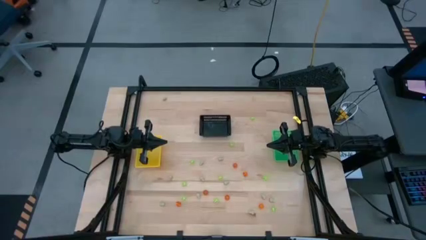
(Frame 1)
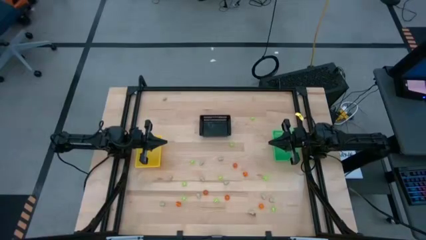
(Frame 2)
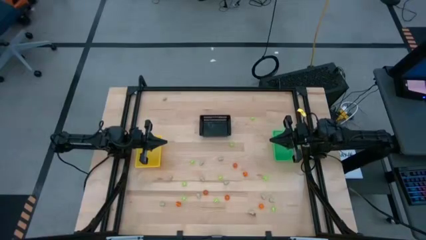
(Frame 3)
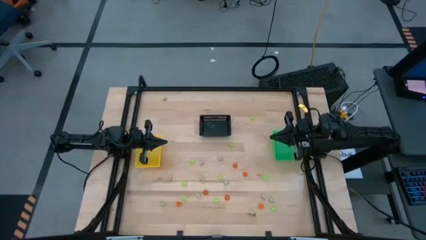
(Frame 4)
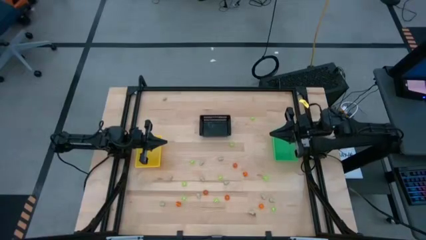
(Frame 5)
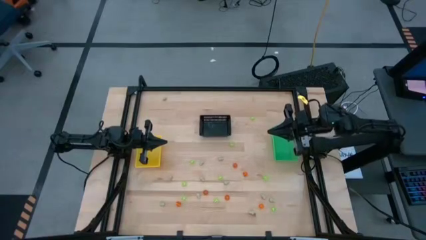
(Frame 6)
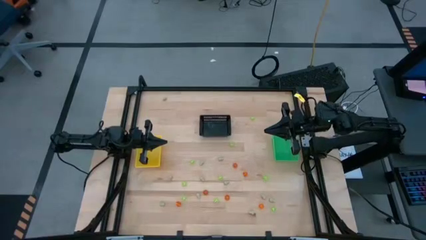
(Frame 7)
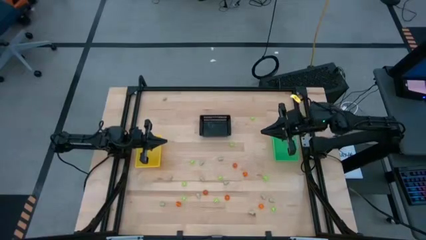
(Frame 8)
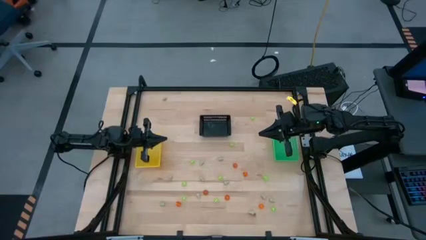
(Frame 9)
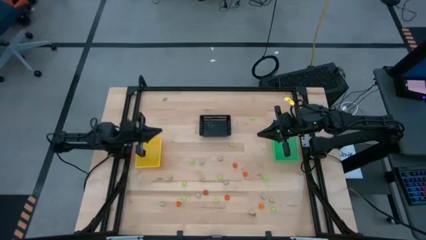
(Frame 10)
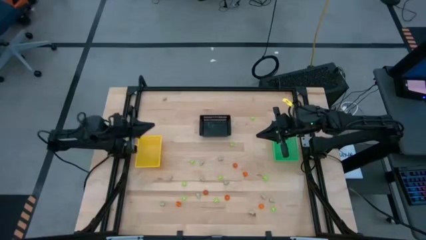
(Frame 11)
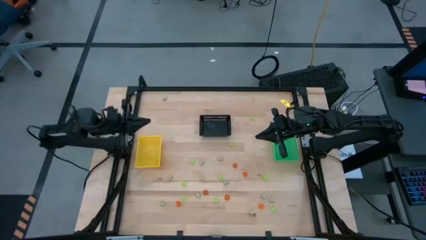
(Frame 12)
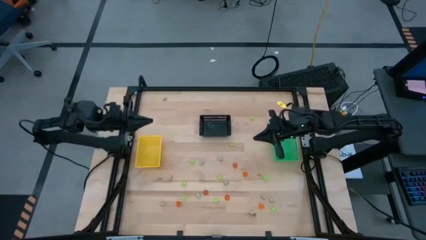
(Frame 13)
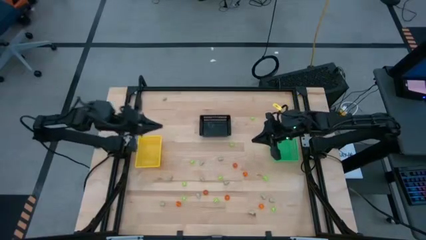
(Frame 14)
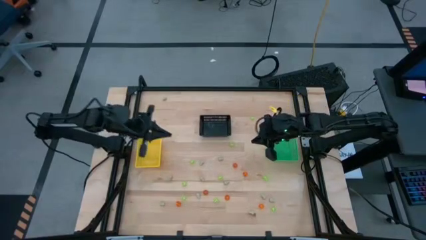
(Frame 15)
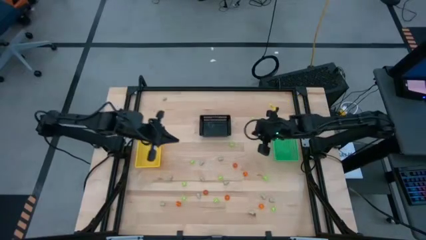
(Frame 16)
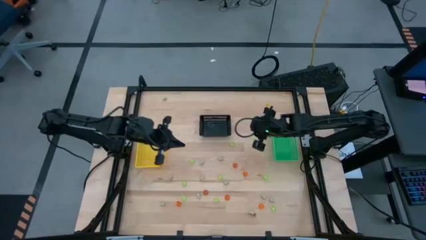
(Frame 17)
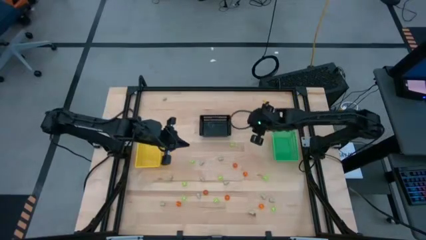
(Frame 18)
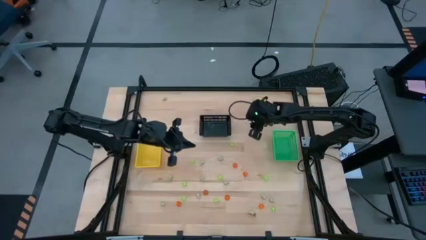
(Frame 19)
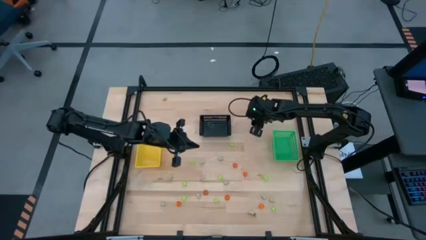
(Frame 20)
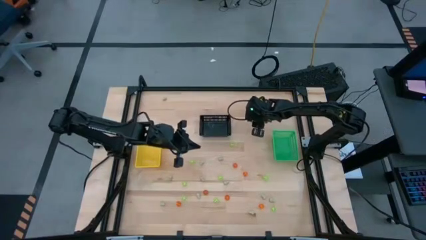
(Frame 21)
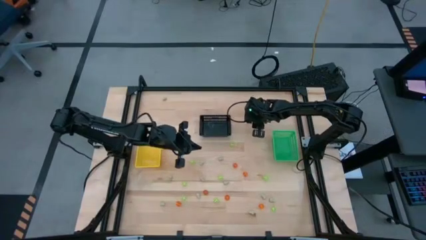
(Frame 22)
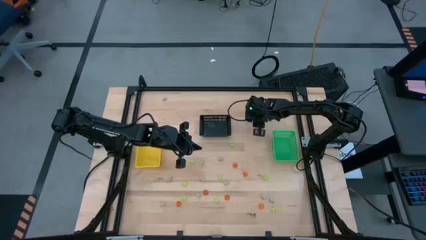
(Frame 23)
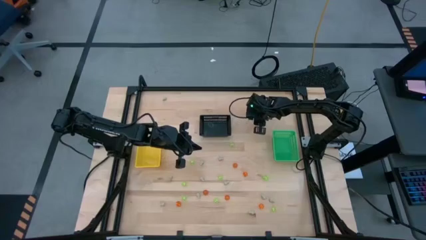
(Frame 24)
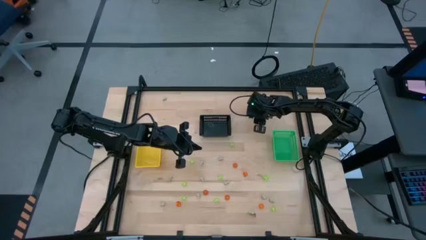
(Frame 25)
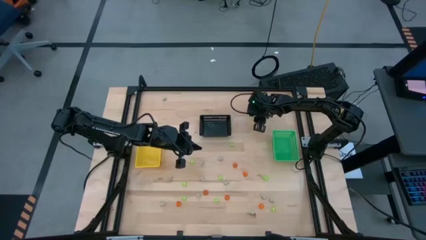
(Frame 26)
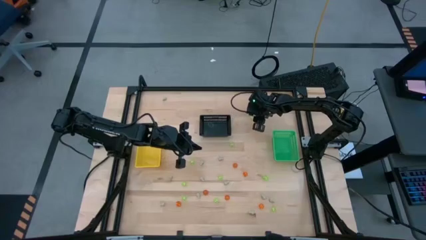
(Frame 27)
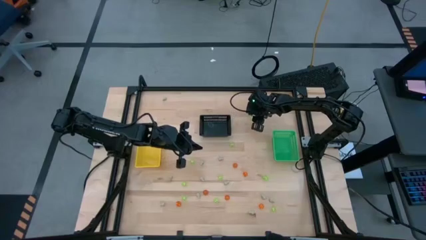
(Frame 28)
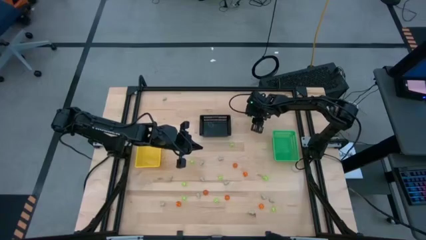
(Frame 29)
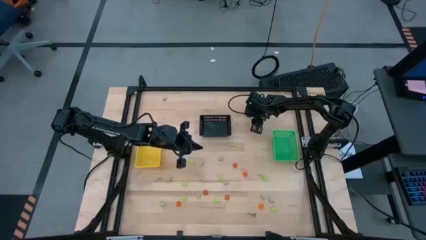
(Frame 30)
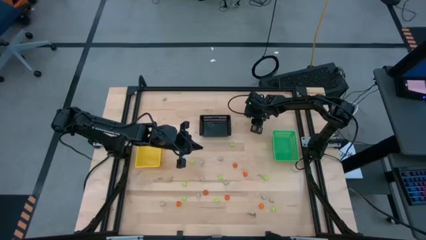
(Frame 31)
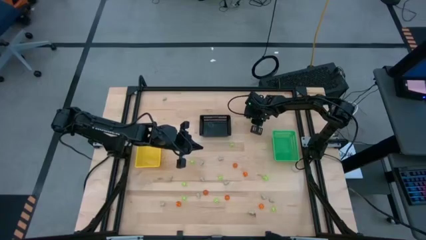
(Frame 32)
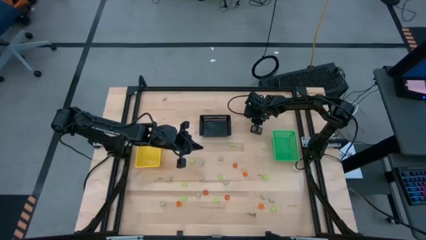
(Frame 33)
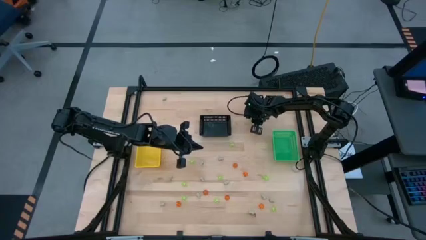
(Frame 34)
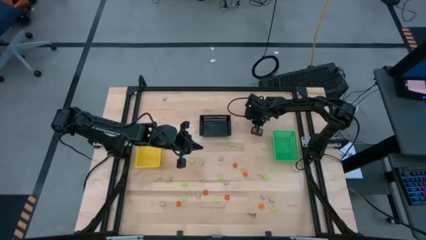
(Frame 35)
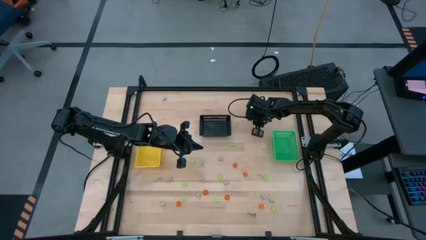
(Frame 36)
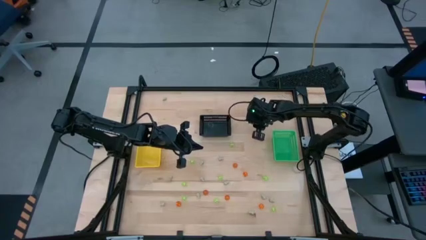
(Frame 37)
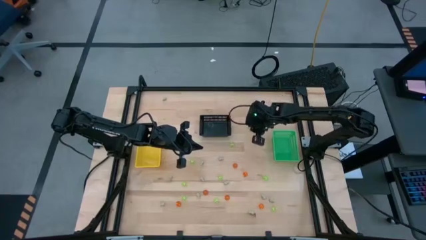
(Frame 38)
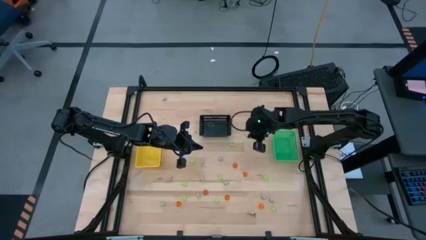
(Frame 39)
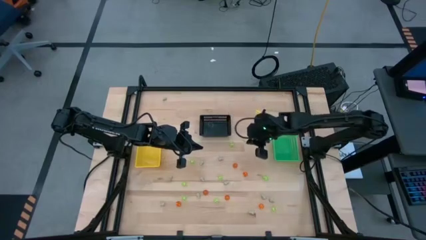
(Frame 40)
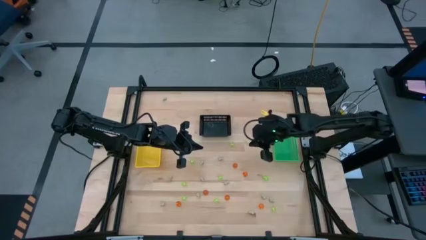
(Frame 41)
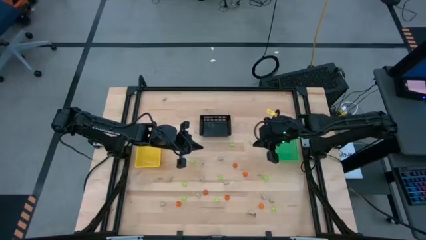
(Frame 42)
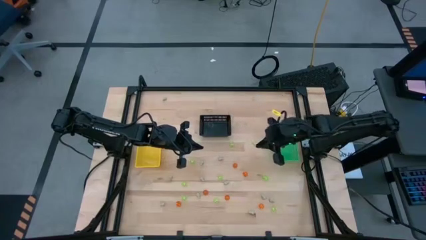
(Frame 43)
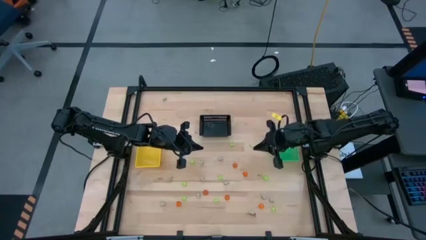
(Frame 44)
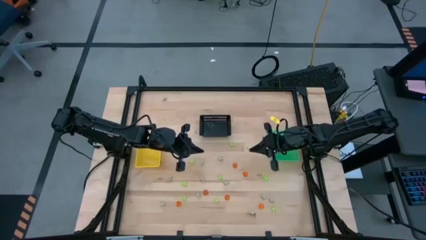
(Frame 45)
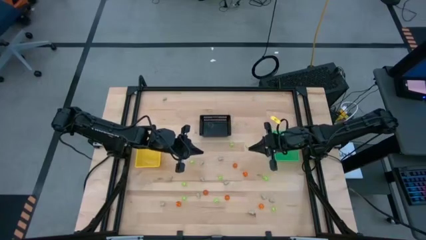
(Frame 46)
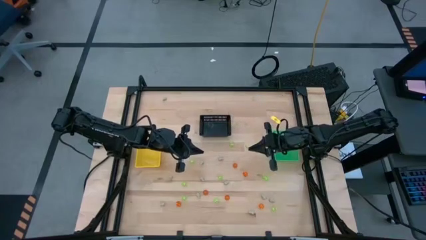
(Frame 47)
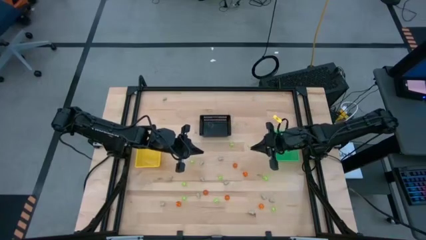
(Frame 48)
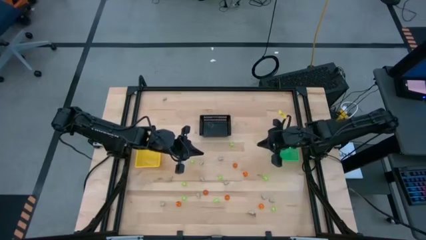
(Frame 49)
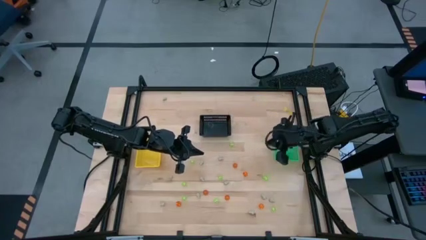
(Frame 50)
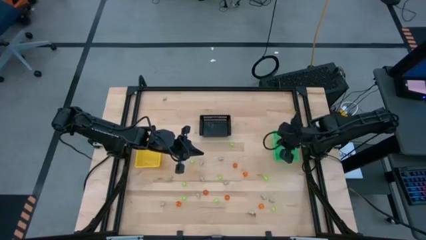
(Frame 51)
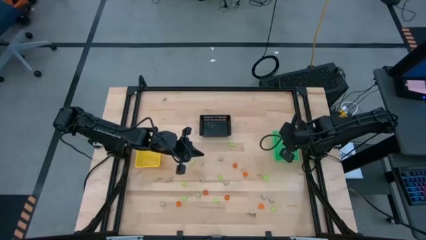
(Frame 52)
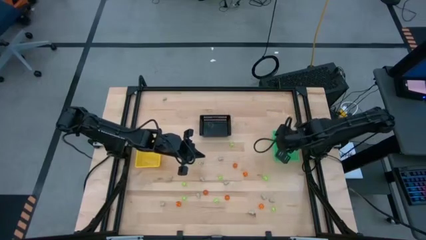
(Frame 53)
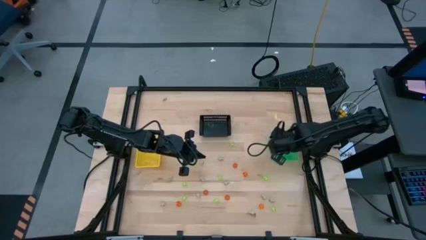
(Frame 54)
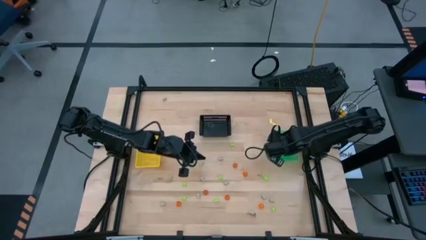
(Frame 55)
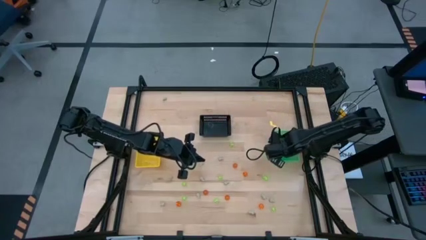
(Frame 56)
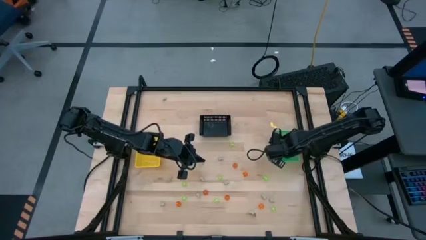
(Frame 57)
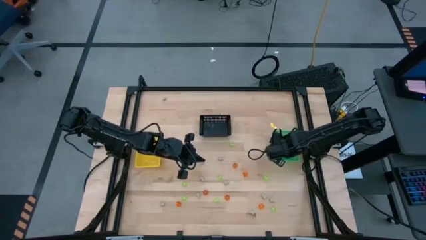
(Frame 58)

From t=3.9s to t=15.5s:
Task: Sort Halloween decoration
Put the green spider toy into the green bin
